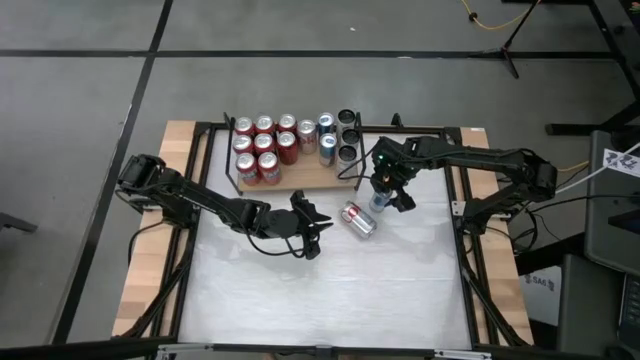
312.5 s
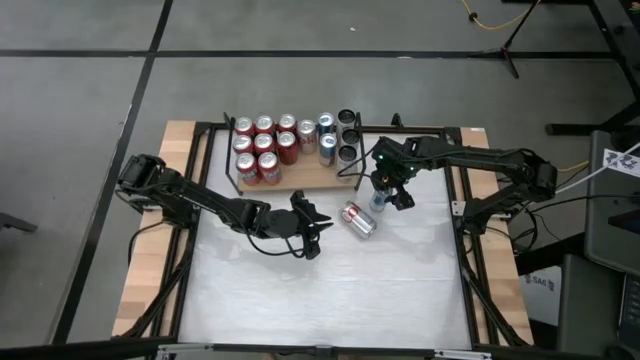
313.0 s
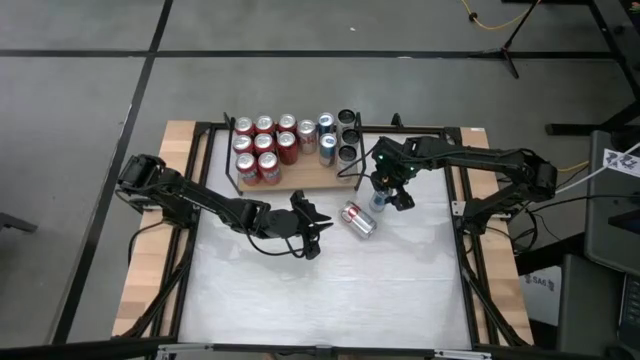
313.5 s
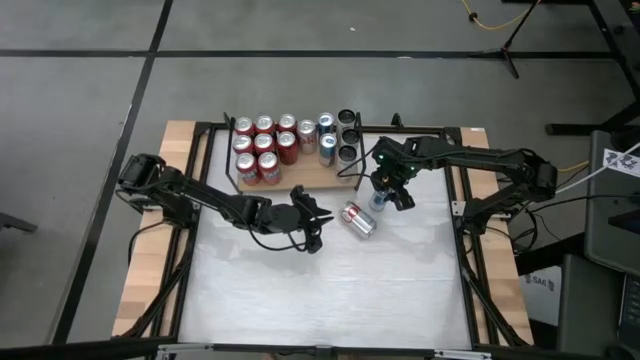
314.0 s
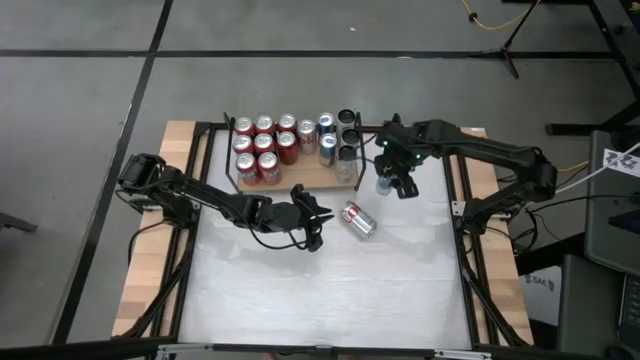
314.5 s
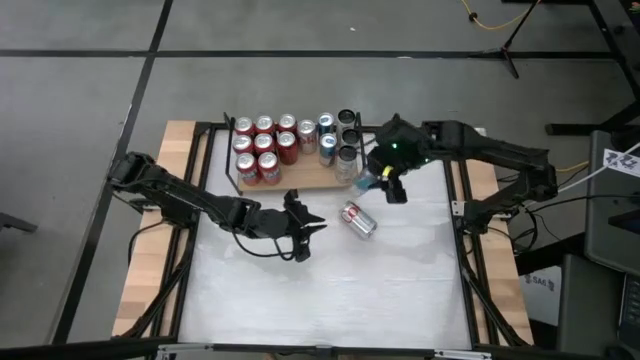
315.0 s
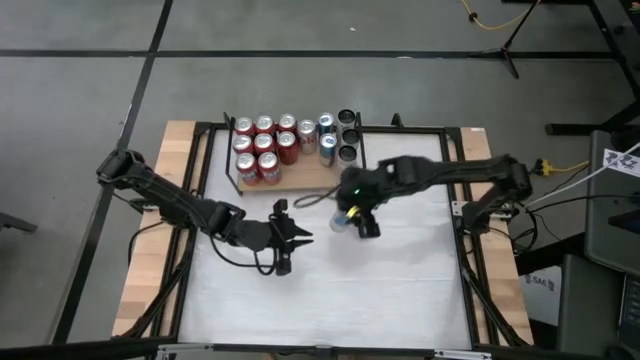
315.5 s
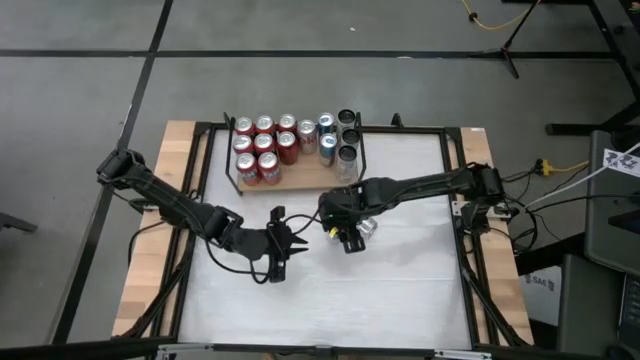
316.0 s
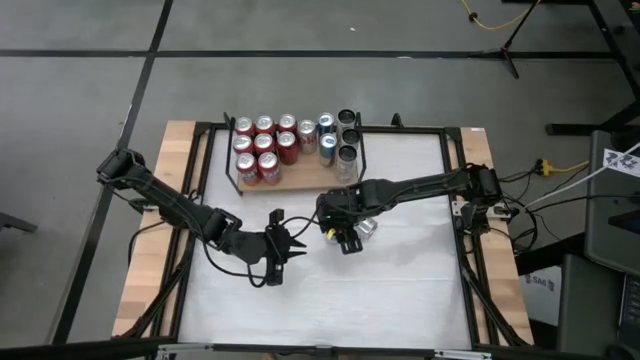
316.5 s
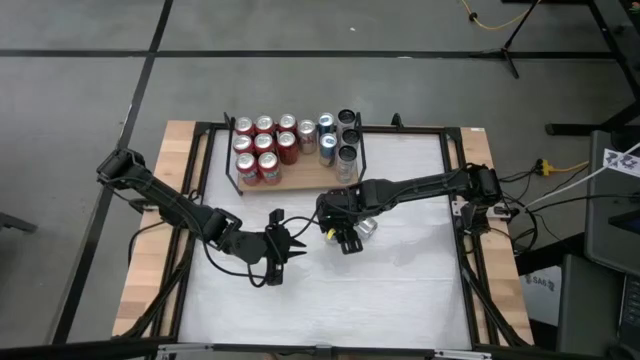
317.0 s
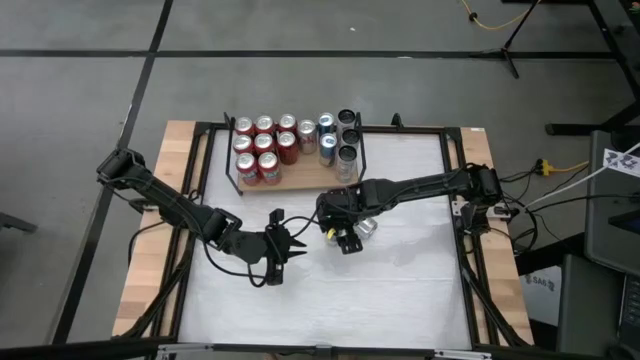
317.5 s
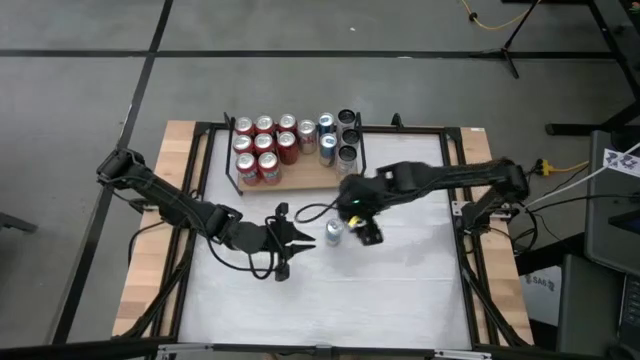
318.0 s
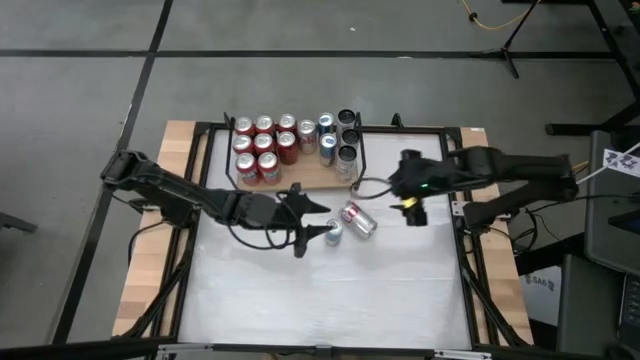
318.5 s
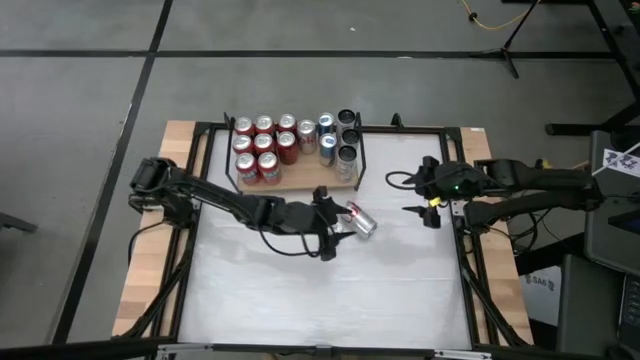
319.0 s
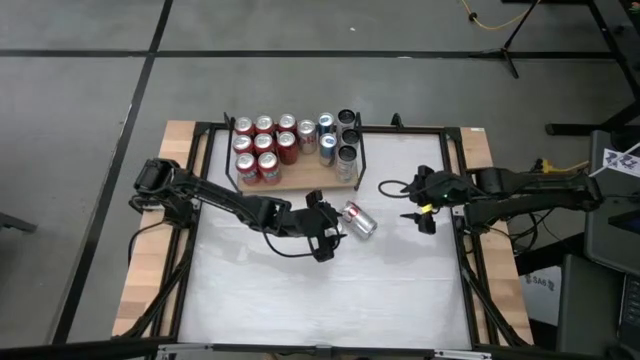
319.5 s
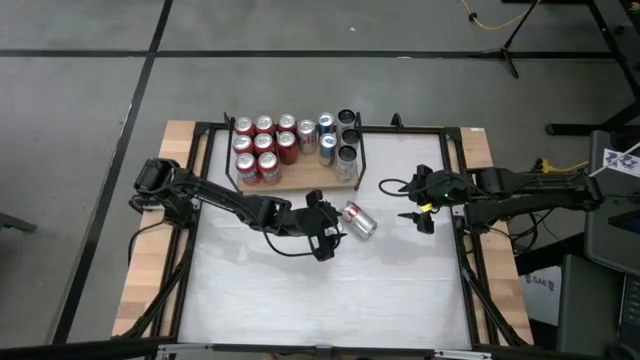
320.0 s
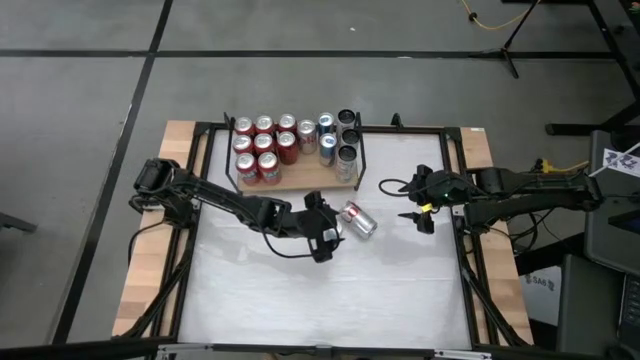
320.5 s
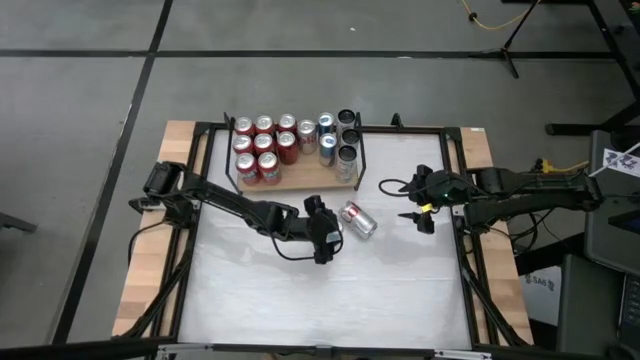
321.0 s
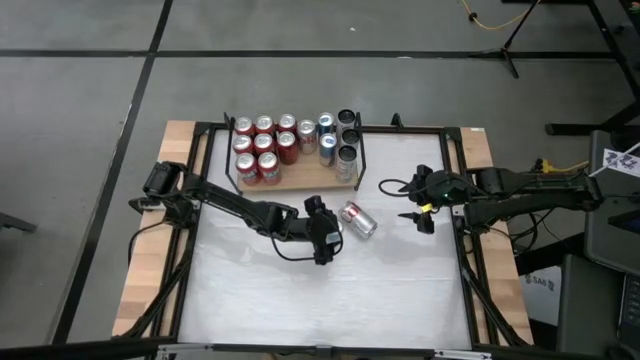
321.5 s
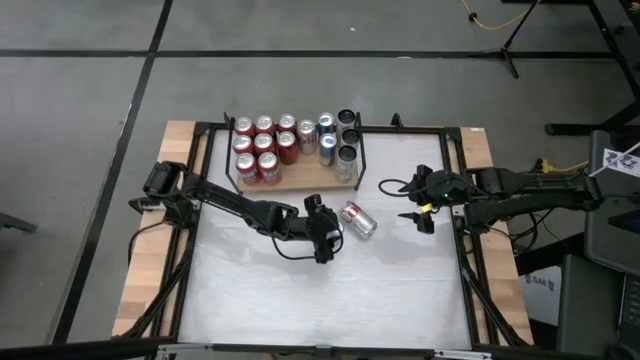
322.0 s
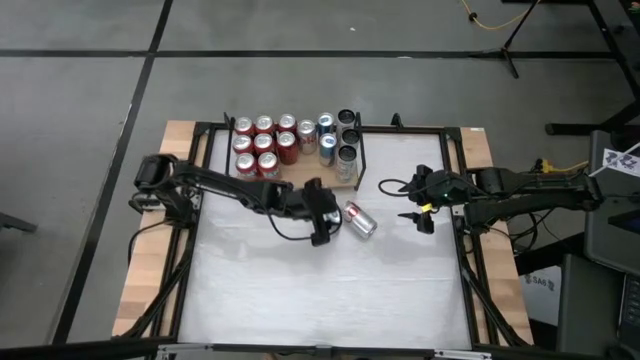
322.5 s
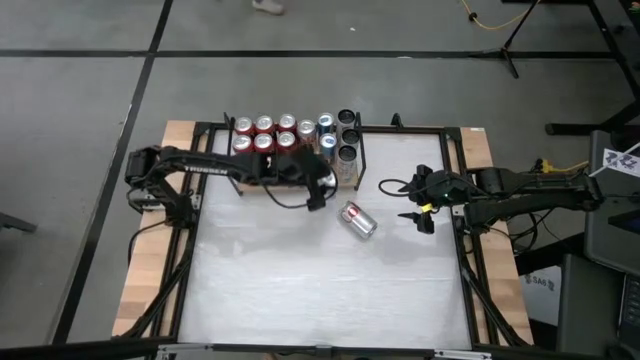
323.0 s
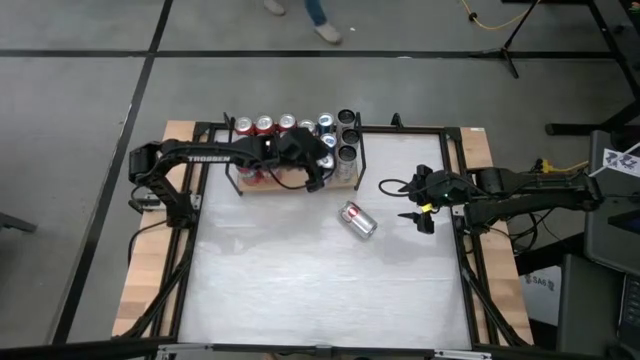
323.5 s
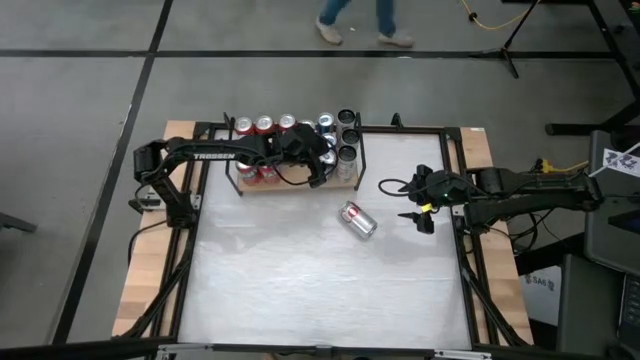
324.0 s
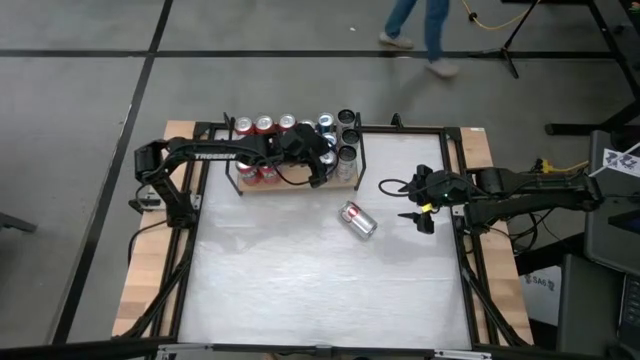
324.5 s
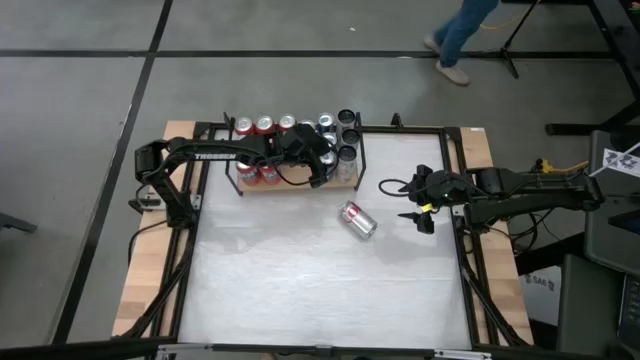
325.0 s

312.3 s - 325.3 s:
Task: Place canned beverage on shelf
Put the blue soda can on the shelf aligned with the other blue soda cans

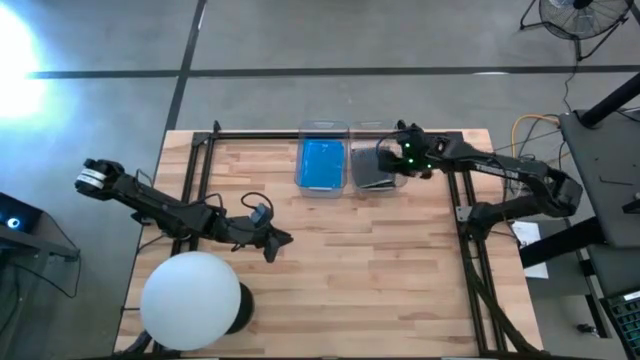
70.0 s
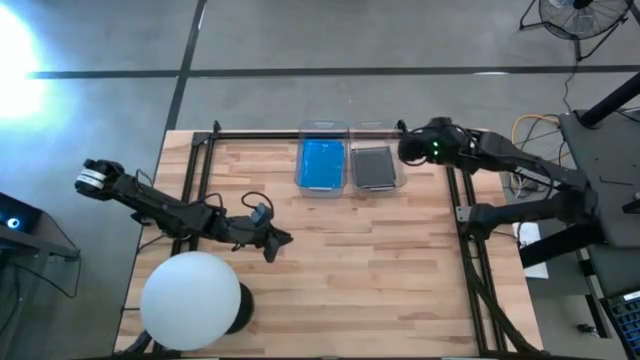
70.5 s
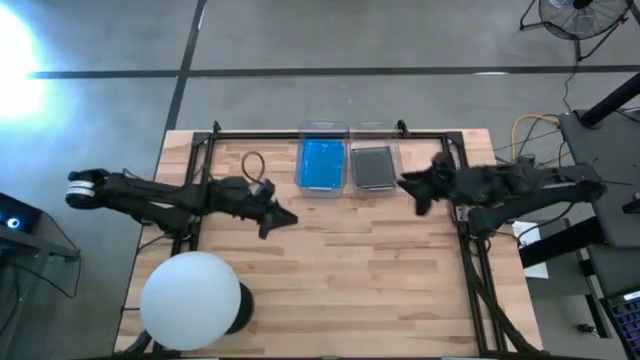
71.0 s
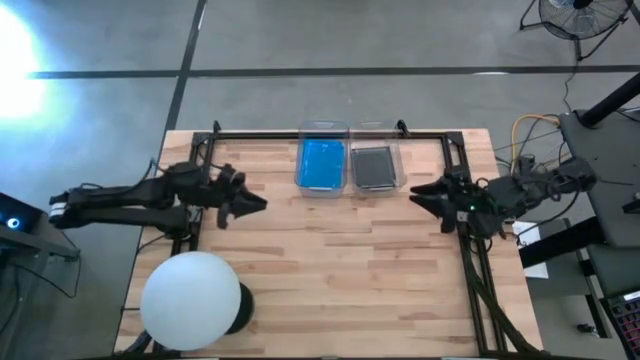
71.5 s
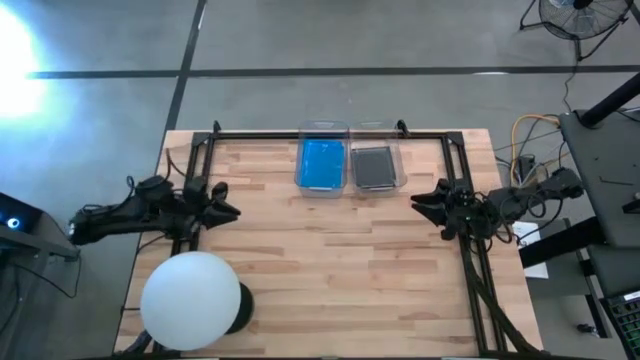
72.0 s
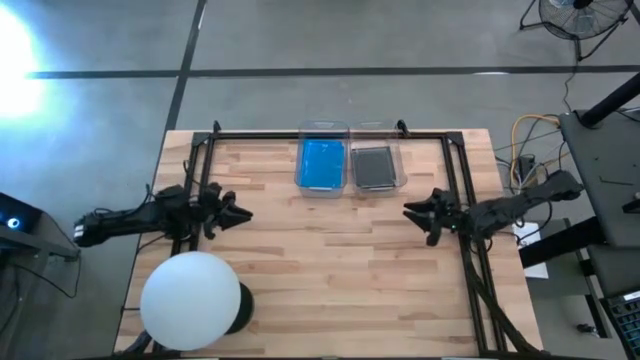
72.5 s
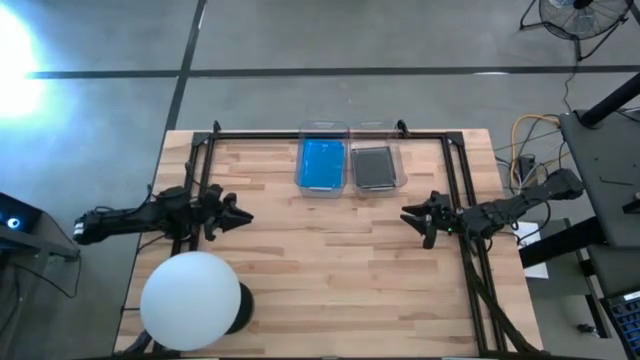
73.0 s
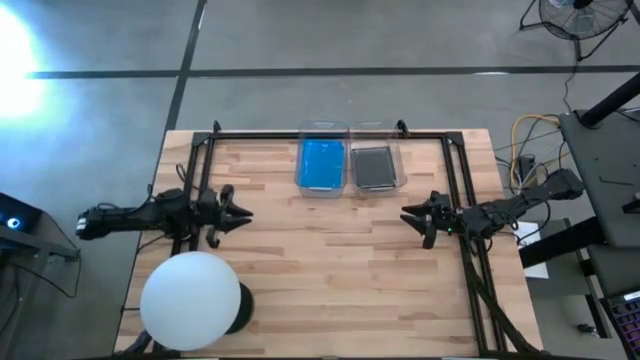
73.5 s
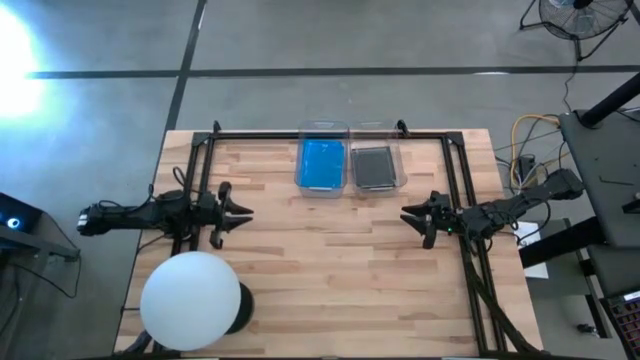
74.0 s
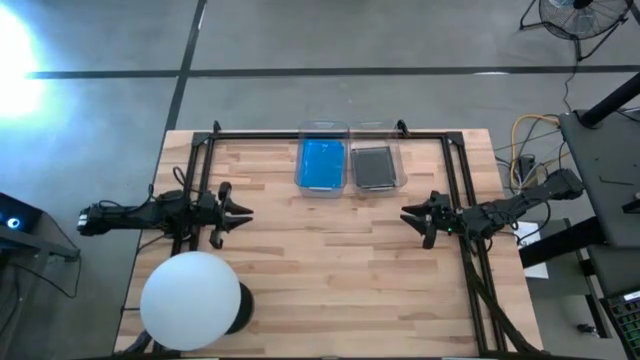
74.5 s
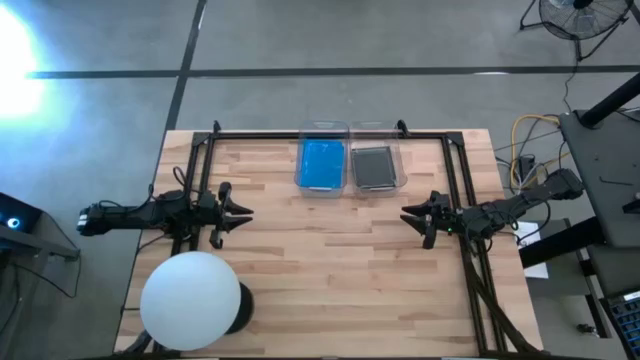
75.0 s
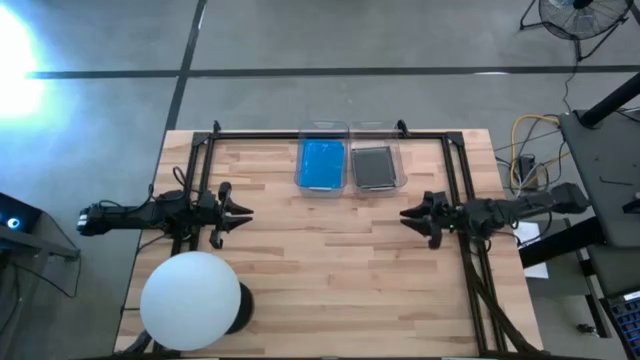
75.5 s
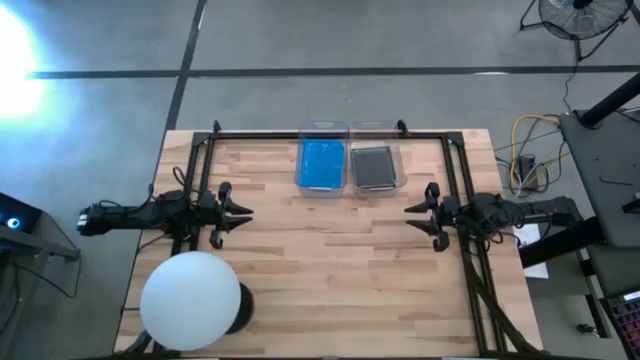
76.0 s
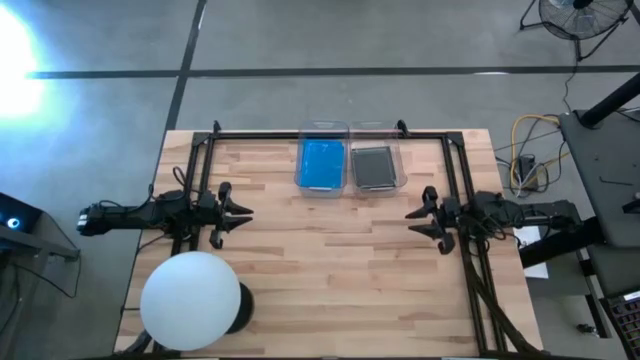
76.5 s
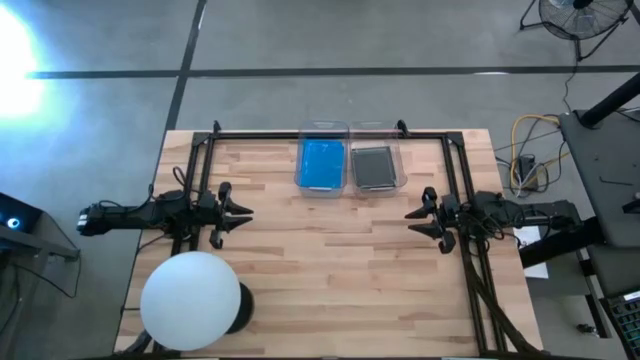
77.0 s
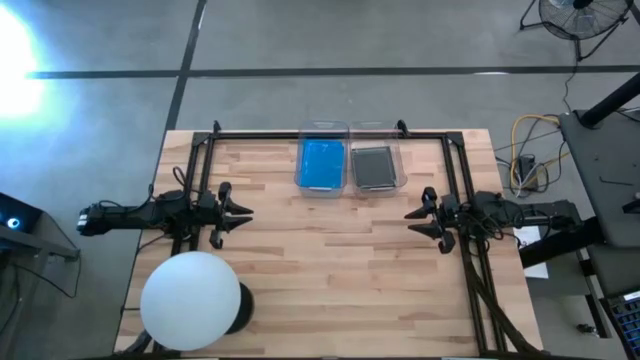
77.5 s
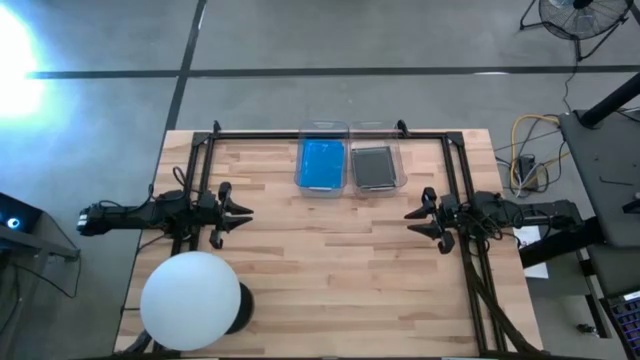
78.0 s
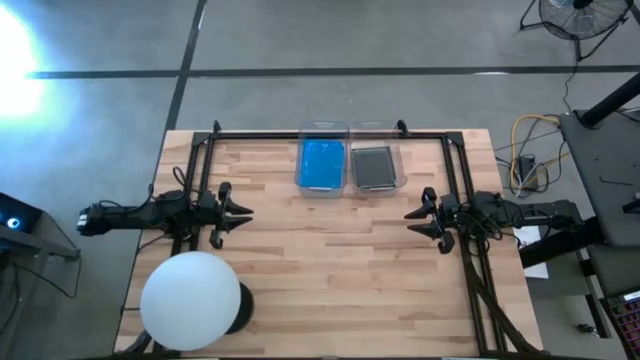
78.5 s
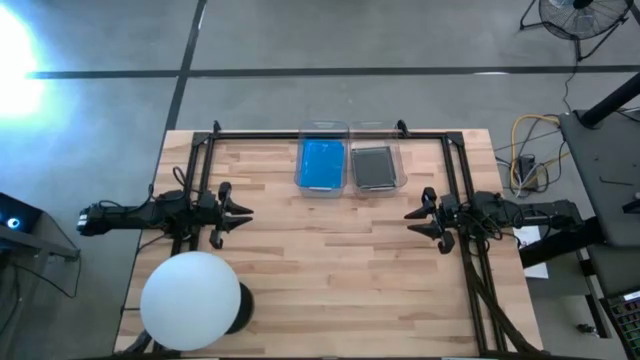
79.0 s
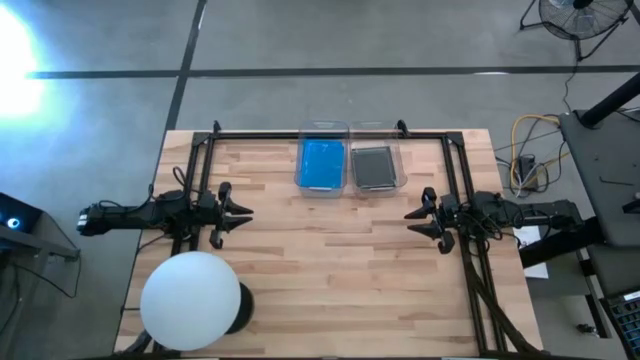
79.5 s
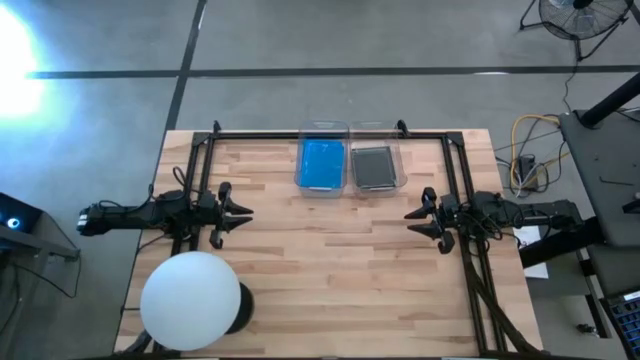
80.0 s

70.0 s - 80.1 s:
Task: Pick & place jewel cases by type
Return to Home Position
